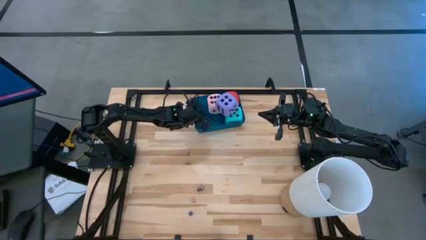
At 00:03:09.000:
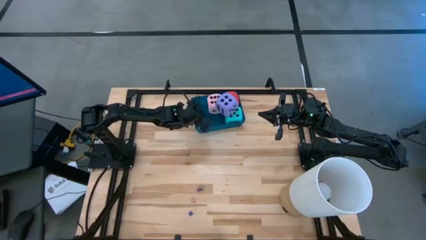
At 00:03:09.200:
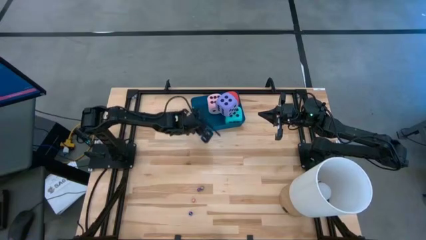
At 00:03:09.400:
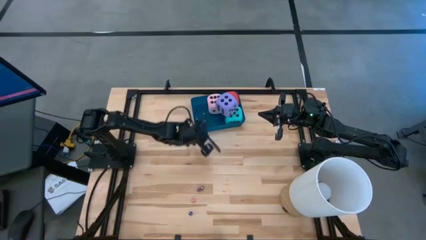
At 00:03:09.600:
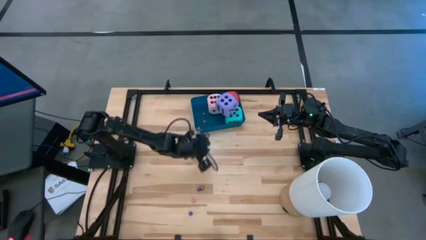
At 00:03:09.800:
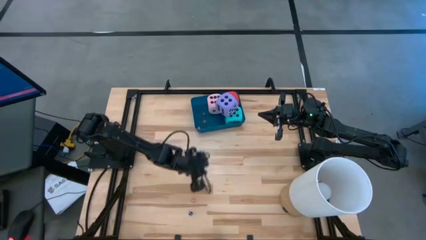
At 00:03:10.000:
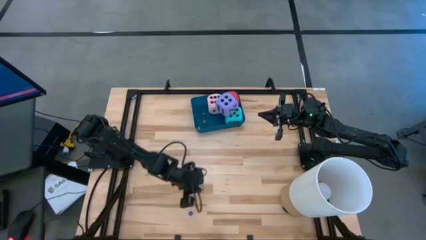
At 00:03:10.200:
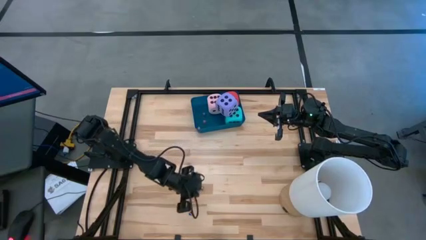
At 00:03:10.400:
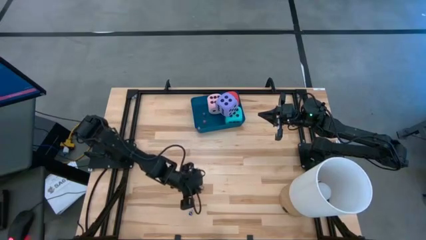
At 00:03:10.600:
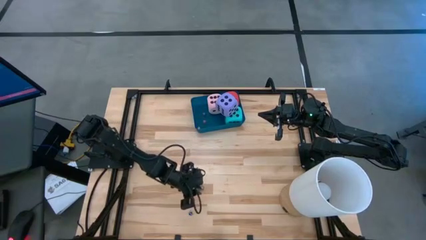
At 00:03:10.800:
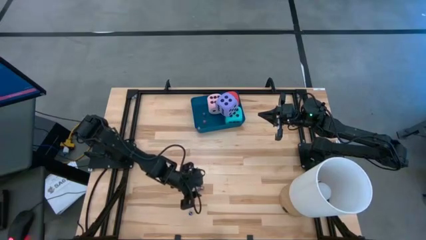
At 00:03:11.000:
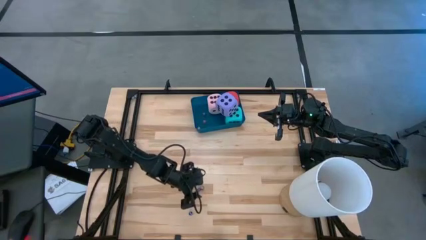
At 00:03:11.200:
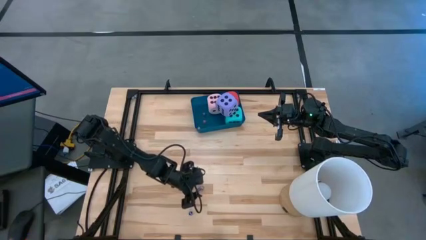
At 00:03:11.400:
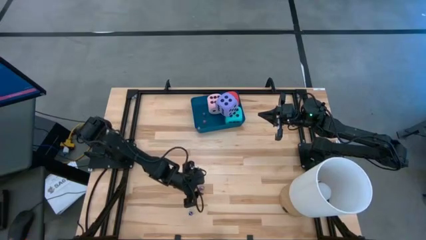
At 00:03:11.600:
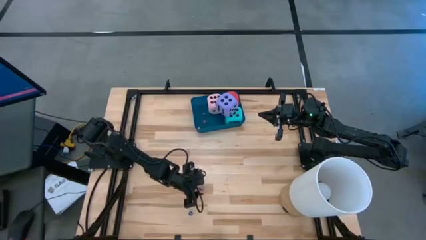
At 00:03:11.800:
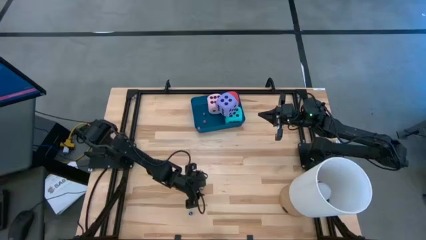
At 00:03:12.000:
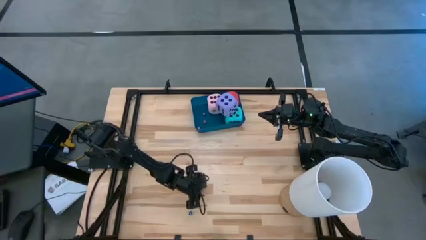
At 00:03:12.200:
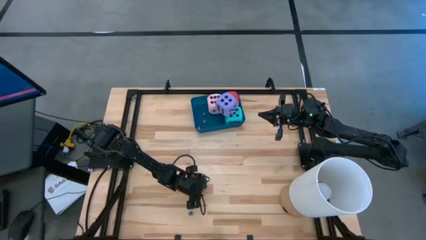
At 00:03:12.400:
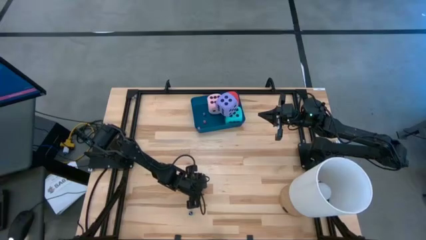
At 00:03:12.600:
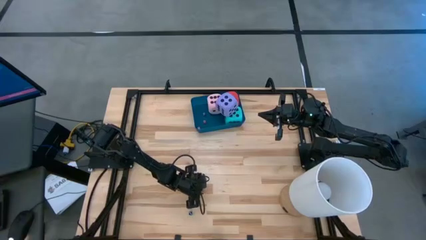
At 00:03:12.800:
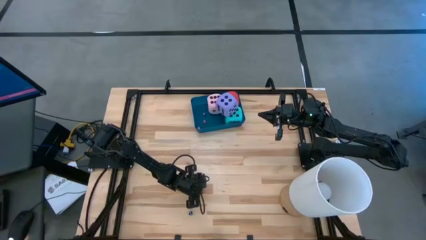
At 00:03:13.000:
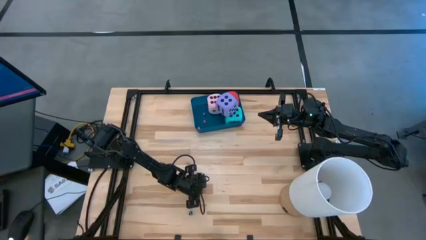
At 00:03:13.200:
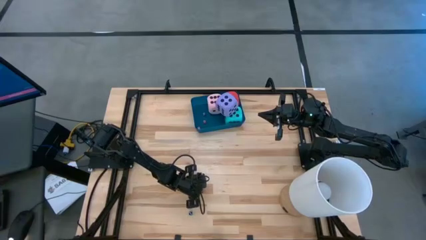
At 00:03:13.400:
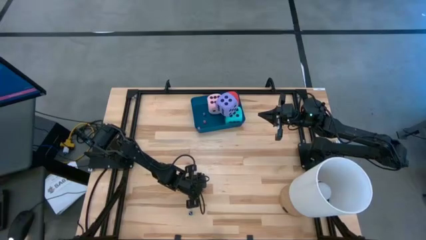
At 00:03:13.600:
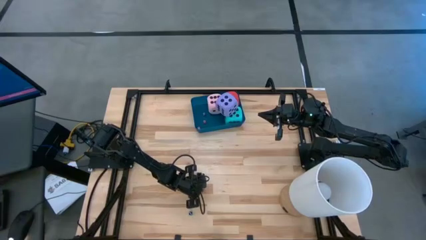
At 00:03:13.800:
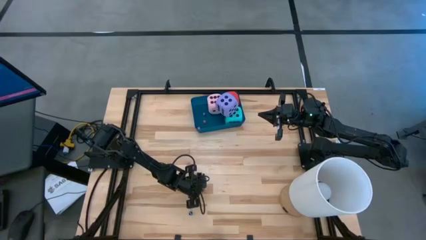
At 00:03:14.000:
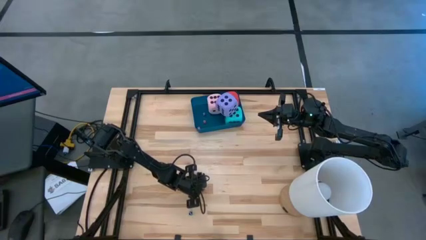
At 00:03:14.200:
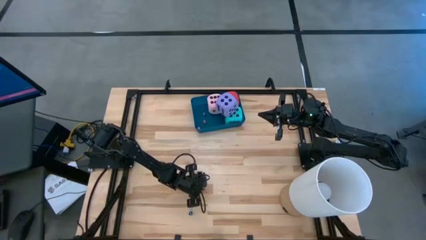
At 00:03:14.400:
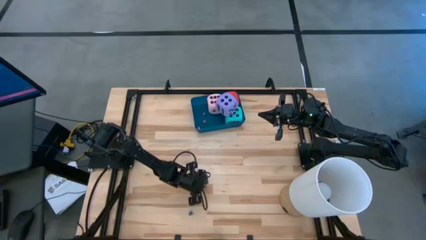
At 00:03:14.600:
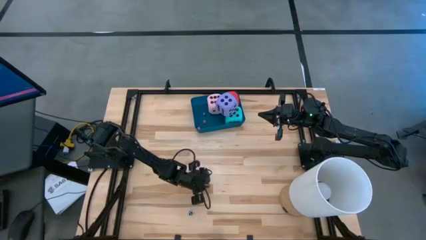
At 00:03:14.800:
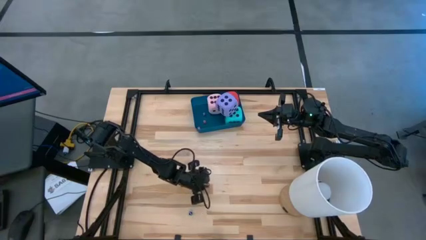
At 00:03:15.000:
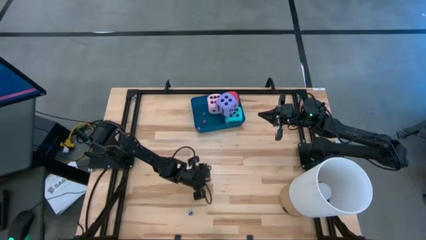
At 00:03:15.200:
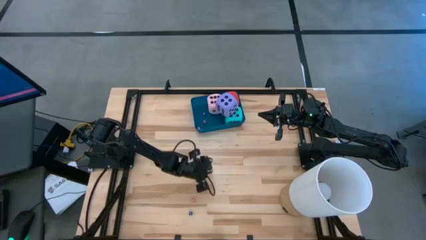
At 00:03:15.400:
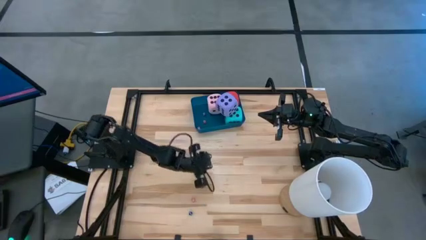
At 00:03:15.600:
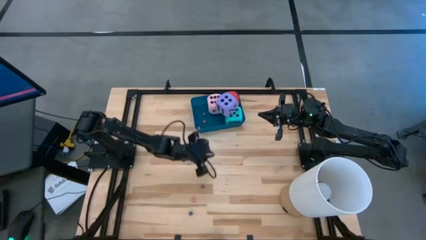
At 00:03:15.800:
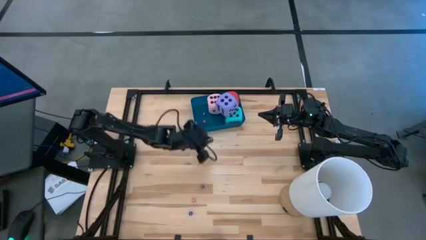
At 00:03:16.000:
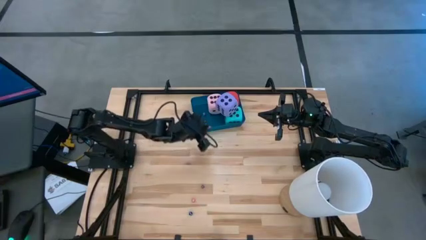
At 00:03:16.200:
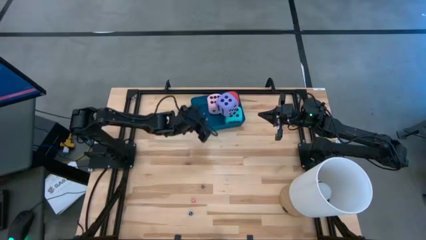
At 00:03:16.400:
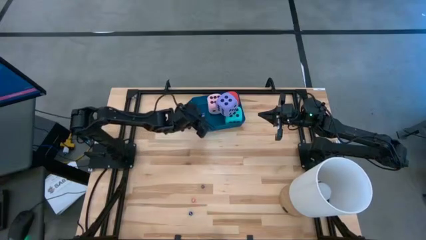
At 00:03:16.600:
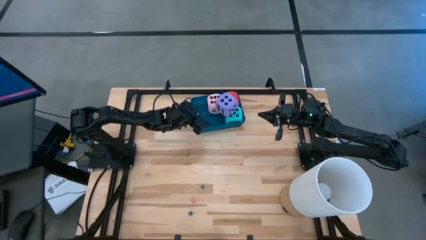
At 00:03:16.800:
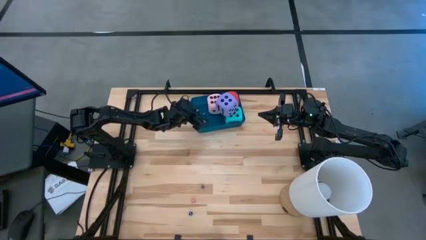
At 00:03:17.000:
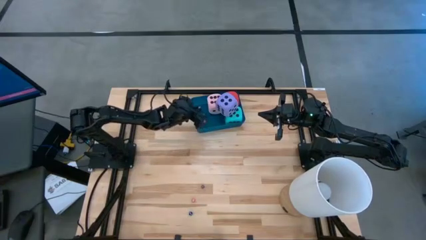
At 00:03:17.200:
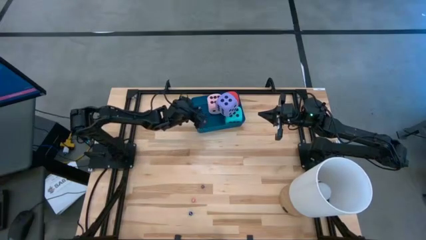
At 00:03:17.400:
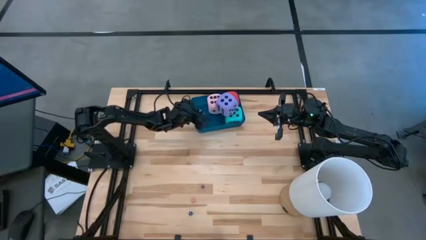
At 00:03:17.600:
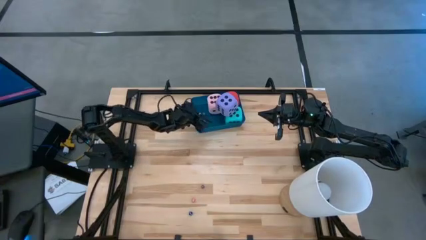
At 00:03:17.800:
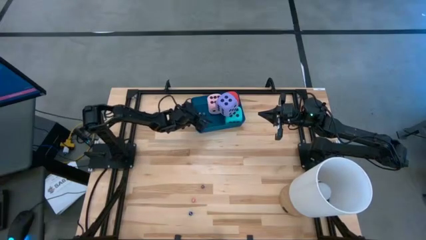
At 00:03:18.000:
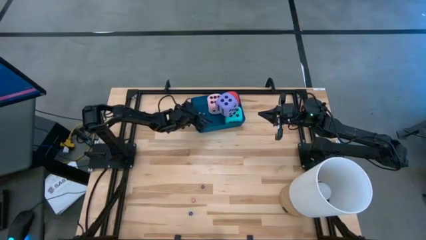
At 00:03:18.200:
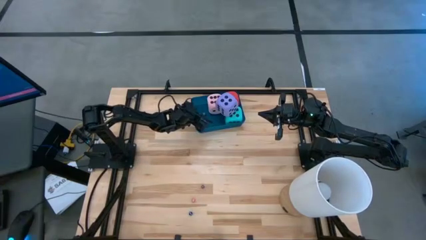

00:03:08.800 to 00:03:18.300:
Task: Pick & Place Dice
Put the small black dice into the blue bin
